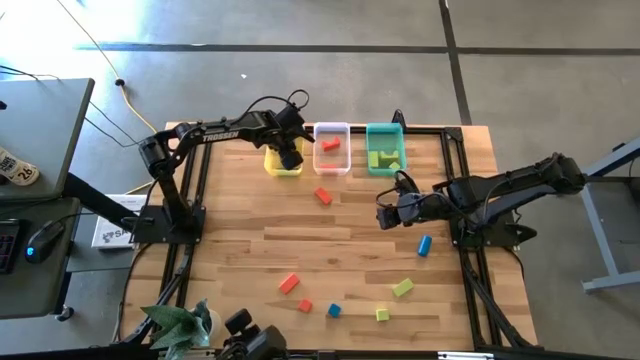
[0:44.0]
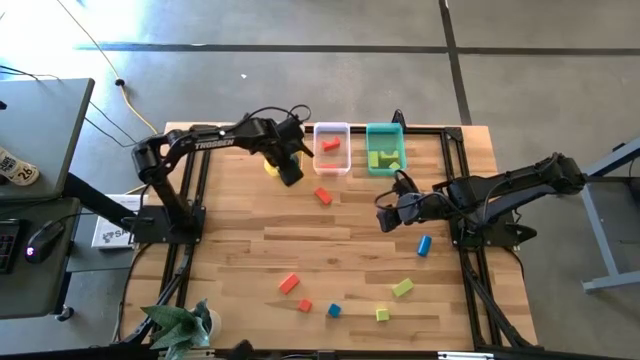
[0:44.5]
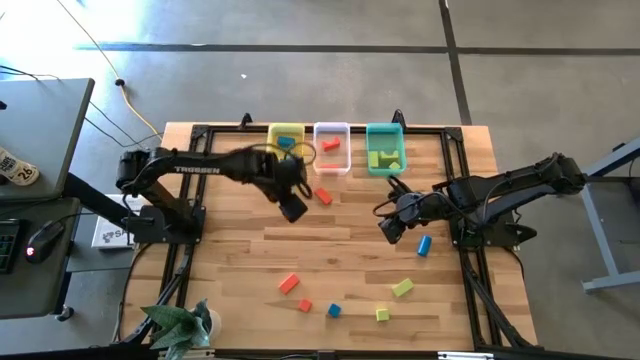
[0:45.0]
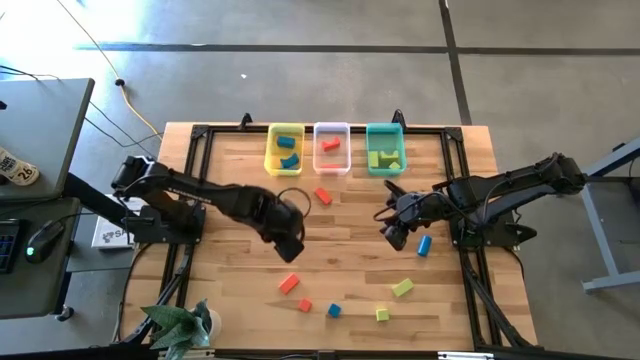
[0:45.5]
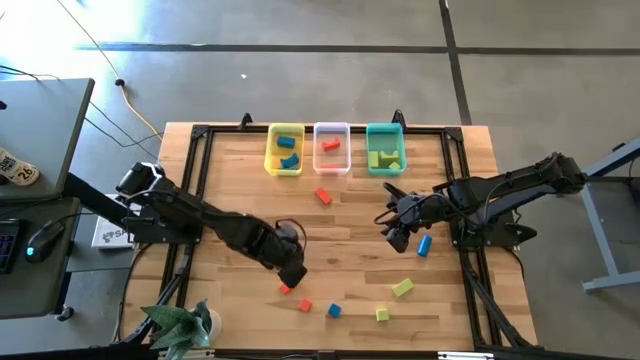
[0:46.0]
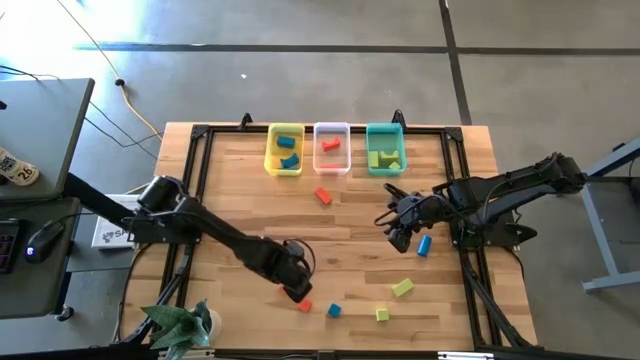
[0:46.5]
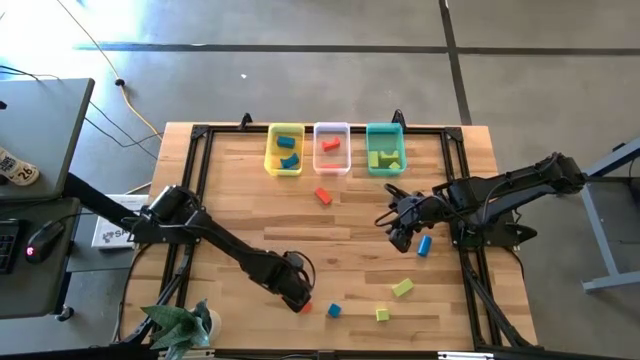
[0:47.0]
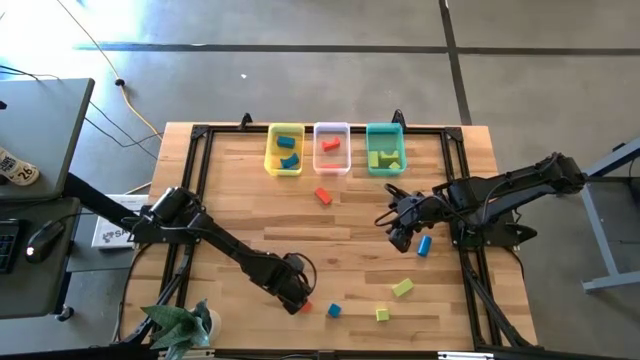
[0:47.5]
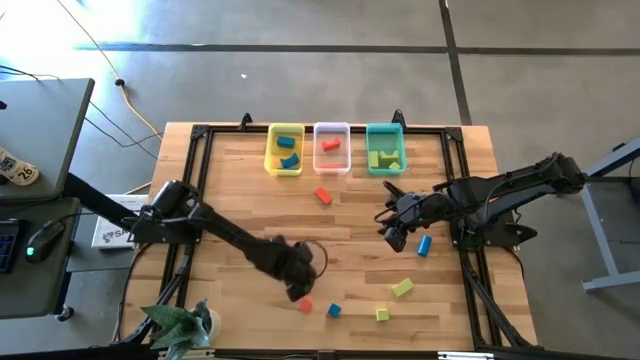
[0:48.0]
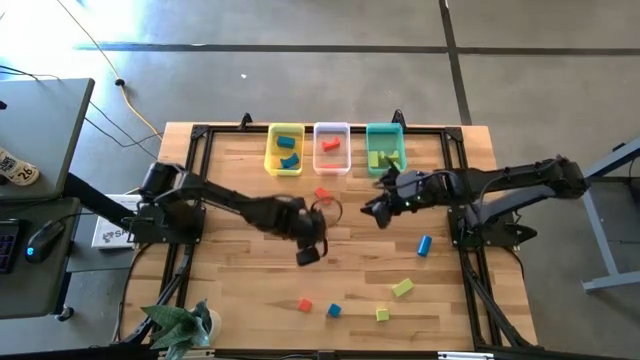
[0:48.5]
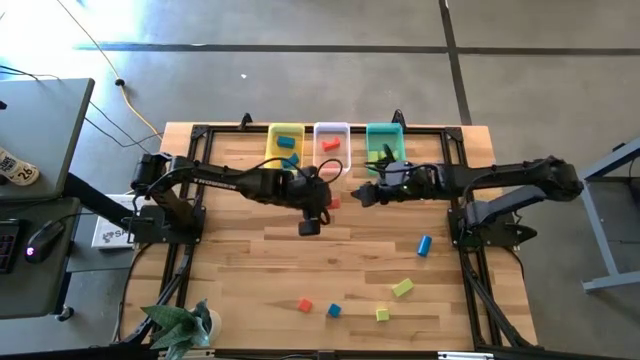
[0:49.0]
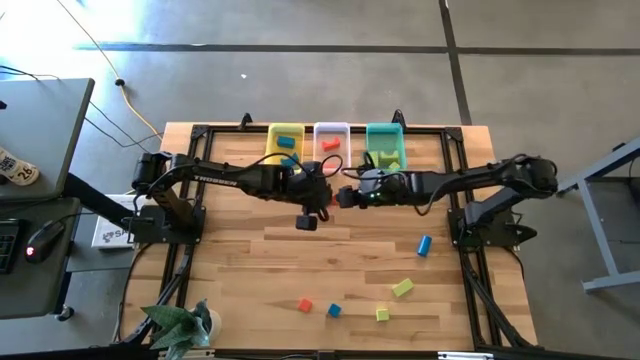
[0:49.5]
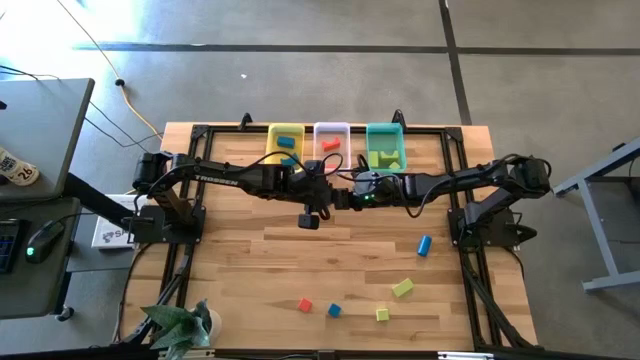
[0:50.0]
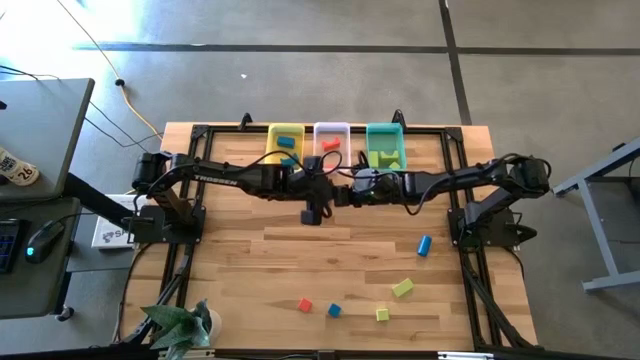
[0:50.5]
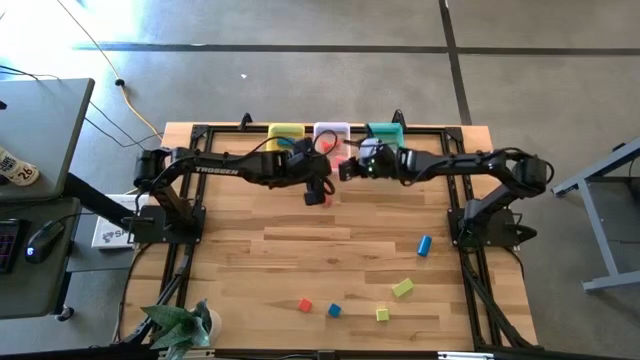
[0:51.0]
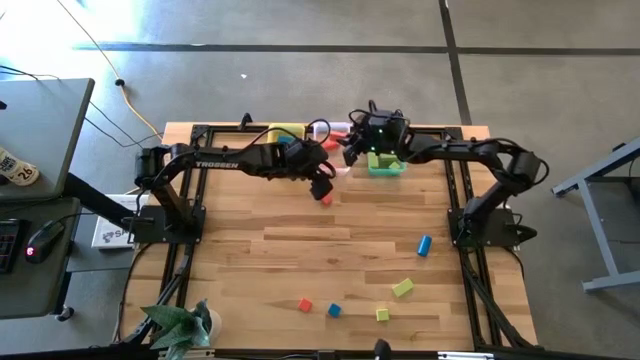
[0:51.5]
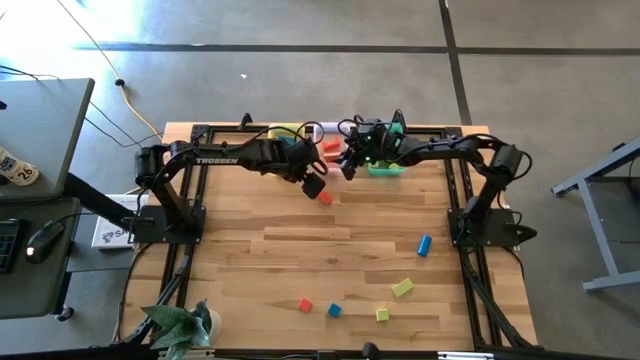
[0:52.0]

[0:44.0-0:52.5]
Task: Sort & place blocks by color
Put the orange block into the transparent bin

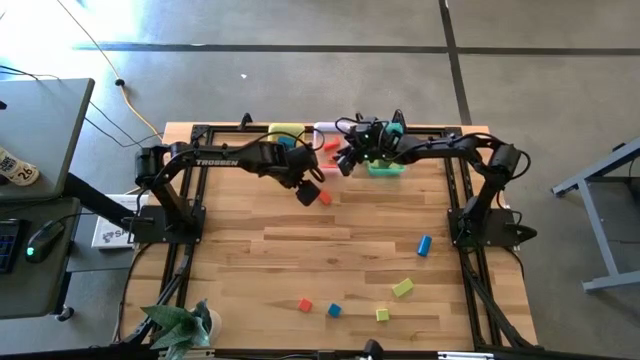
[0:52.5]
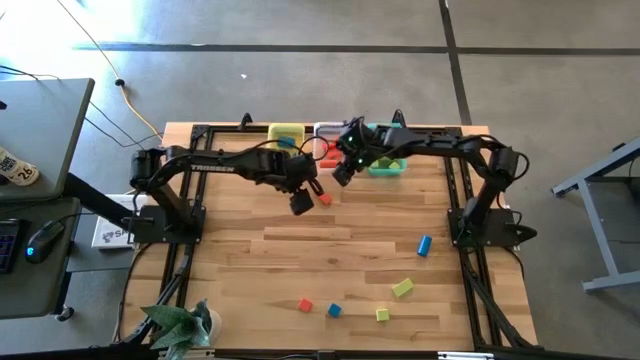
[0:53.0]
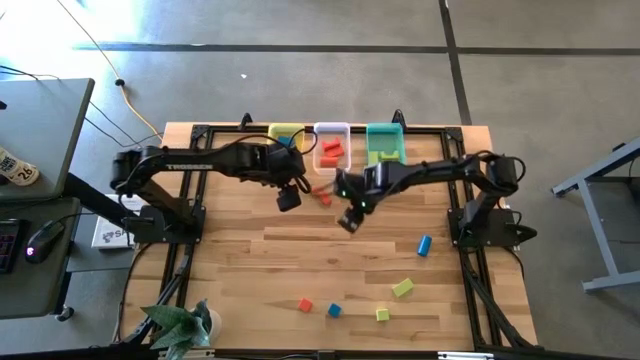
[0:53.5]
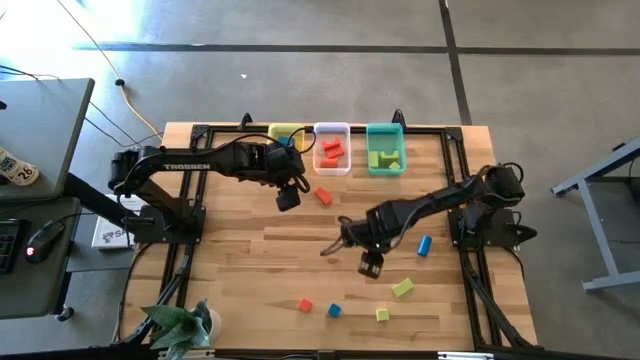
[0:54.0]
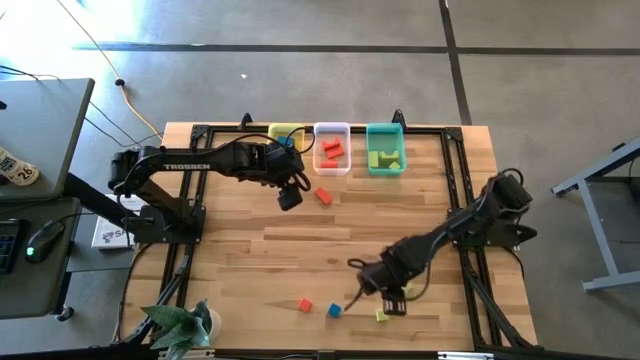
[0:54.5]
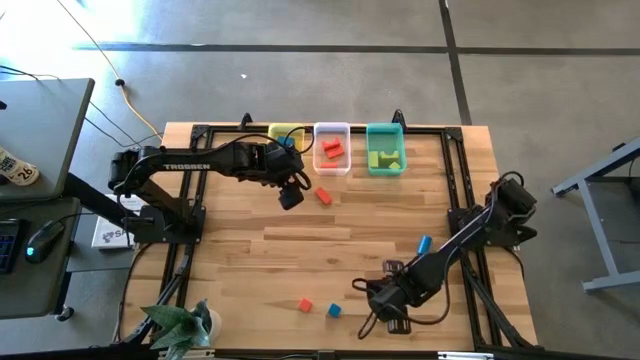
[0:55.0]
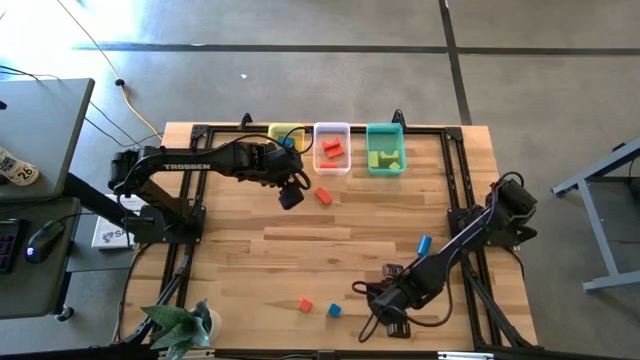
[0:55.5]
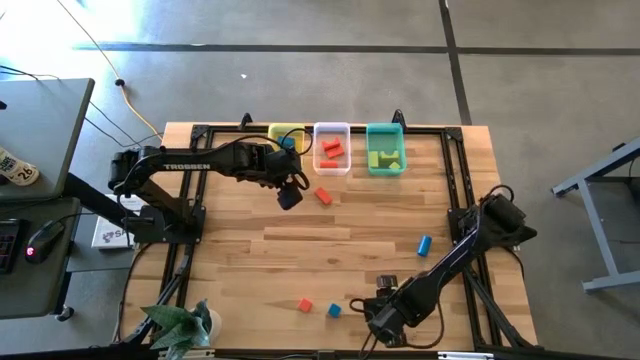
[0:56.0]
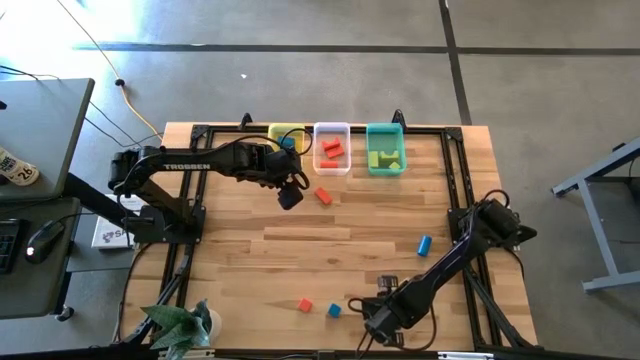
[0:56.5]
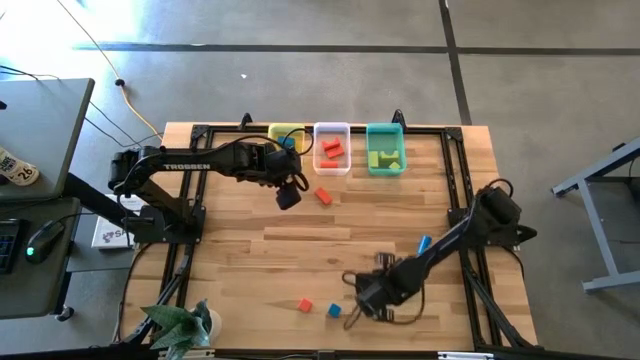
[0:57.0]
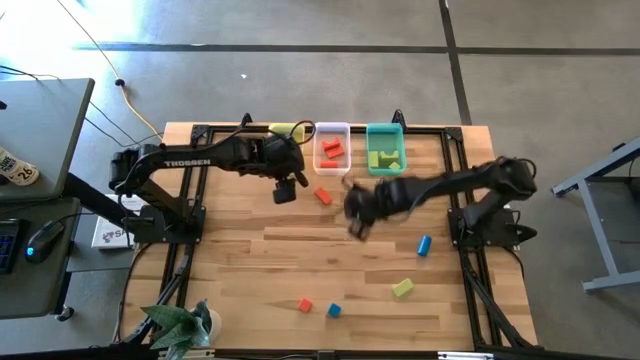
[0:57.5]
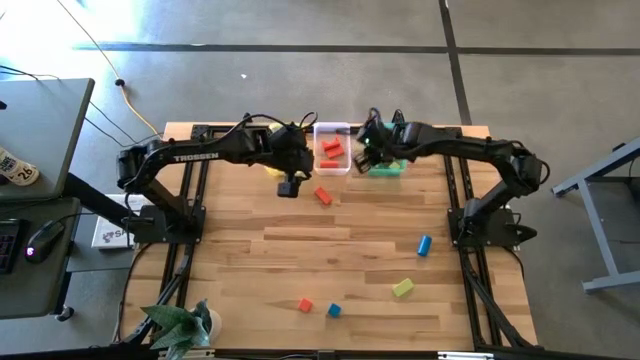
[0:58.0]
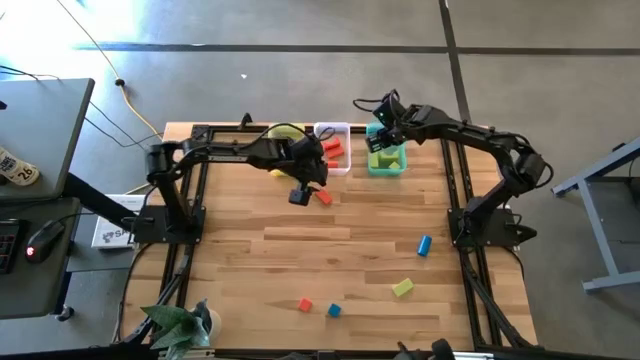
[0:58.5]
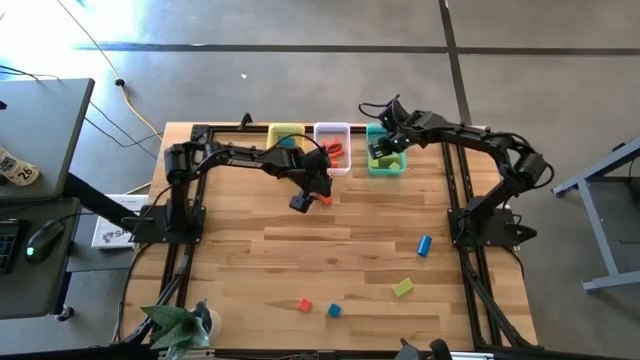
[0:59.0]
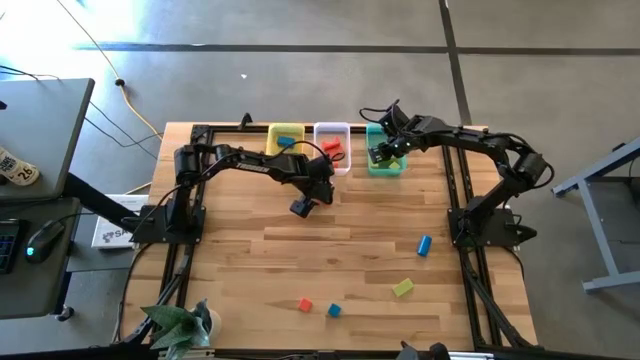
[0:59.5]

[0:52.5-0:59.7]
Put the green block into the green bin

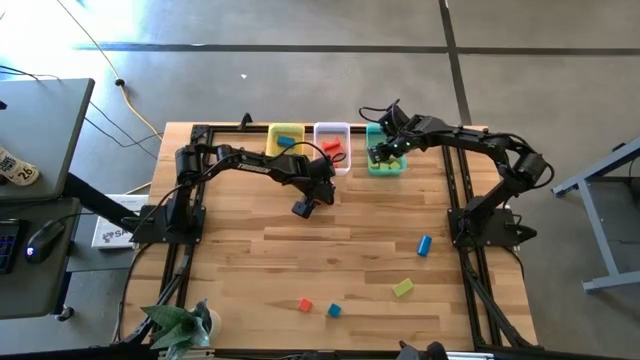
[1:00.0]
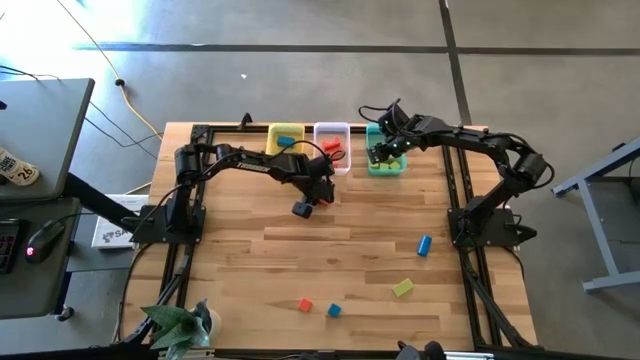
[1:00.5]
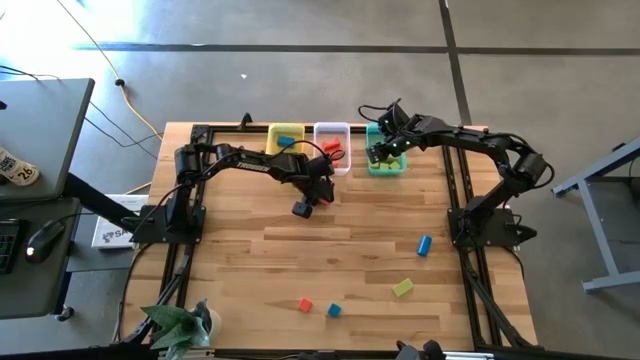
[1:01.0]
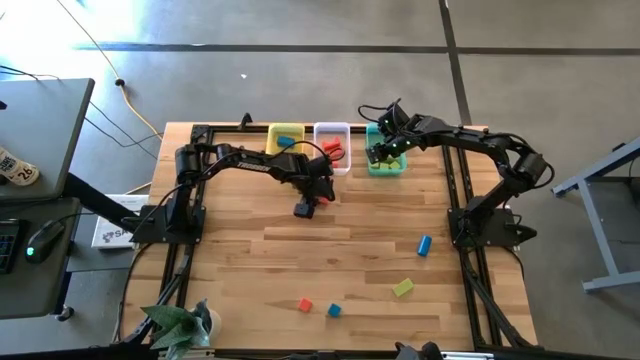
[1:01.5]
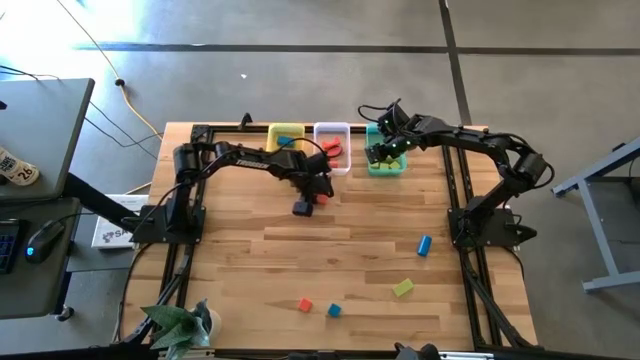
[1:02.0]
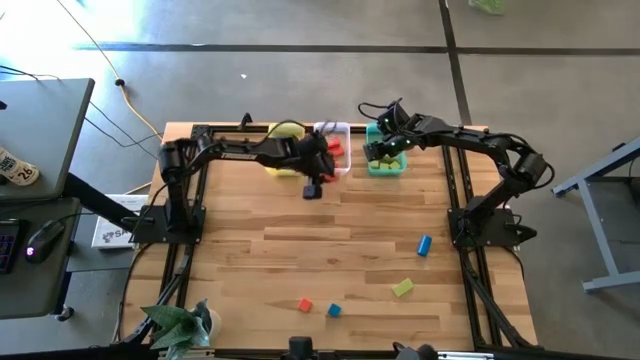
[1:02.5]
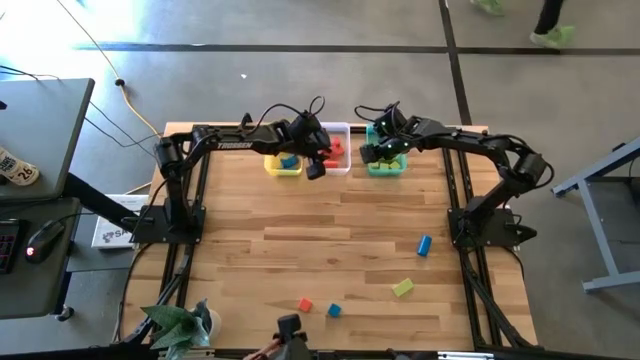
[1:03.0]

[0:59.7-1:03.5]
Put the orange block into the transparent bin
